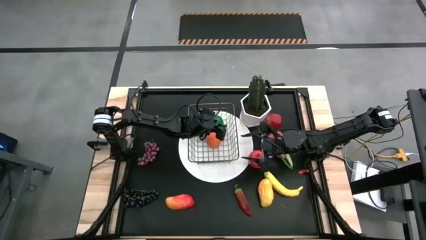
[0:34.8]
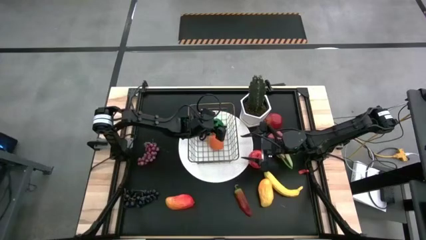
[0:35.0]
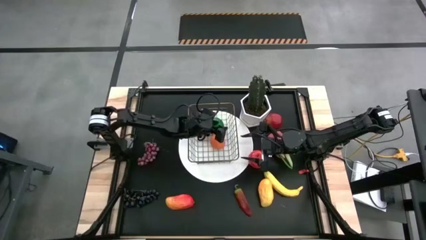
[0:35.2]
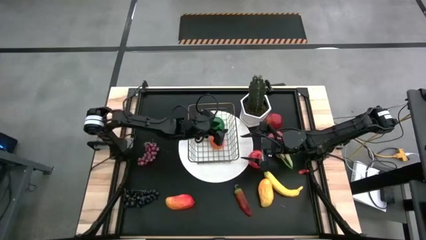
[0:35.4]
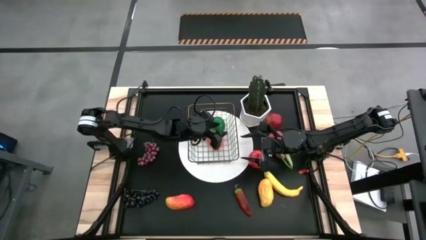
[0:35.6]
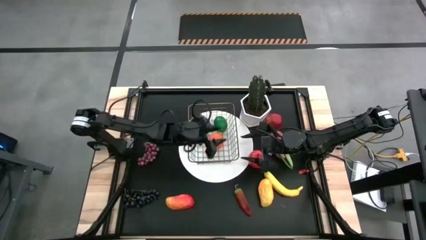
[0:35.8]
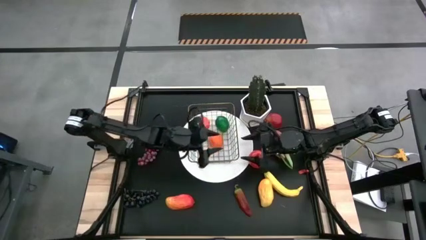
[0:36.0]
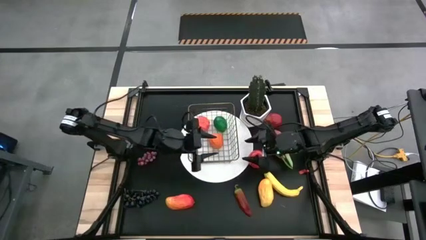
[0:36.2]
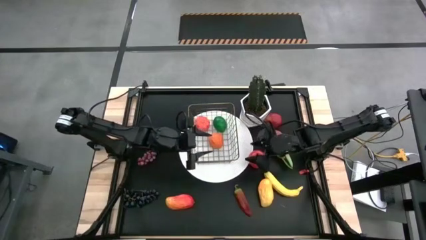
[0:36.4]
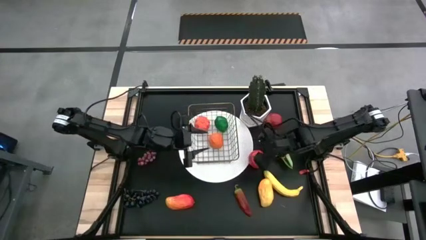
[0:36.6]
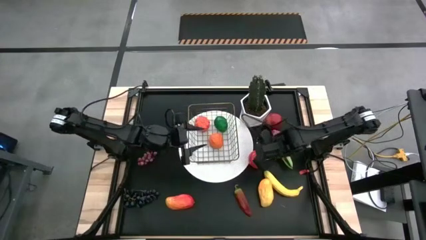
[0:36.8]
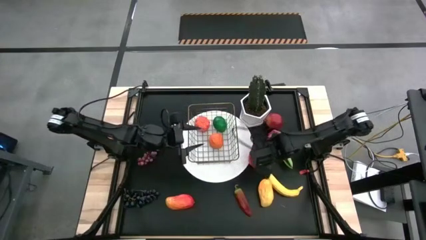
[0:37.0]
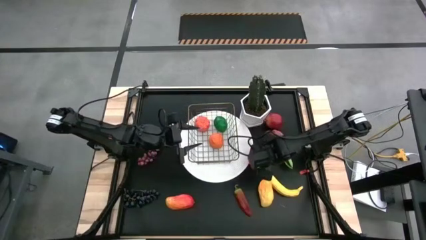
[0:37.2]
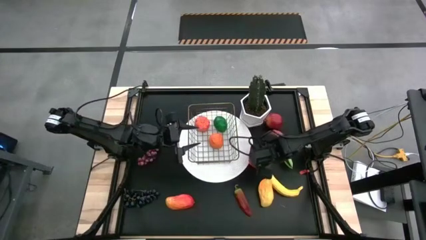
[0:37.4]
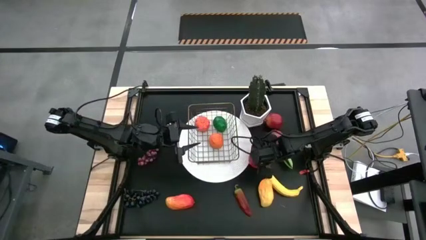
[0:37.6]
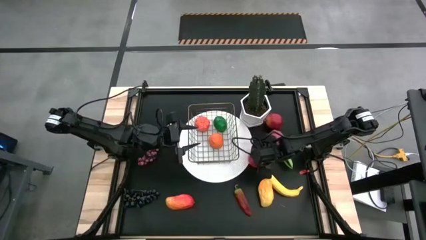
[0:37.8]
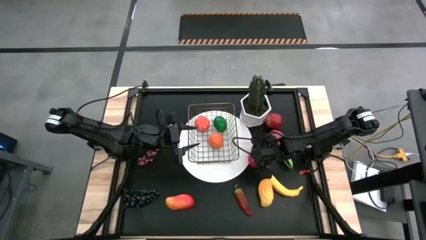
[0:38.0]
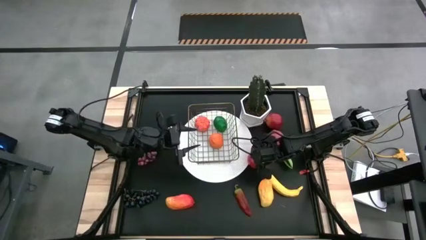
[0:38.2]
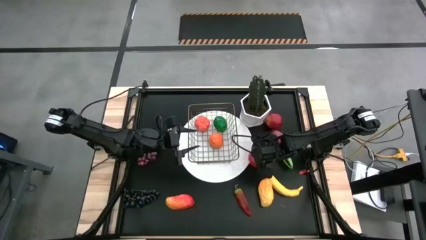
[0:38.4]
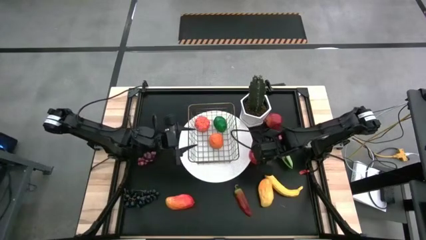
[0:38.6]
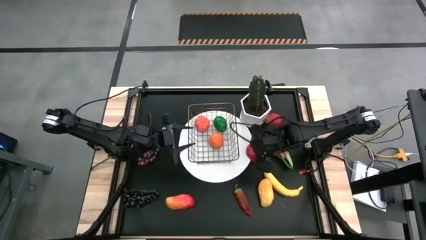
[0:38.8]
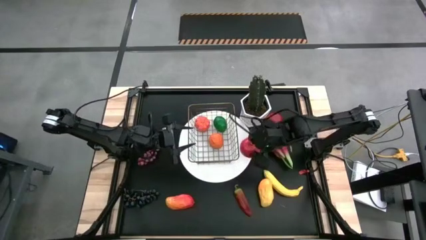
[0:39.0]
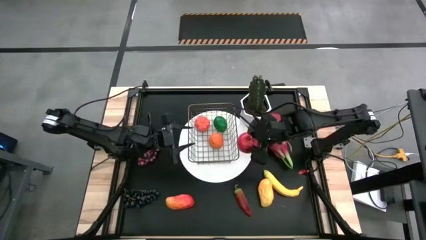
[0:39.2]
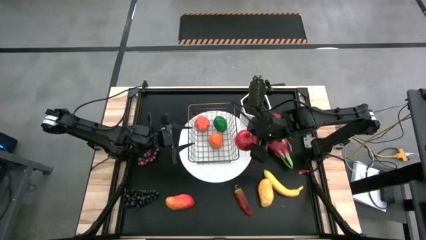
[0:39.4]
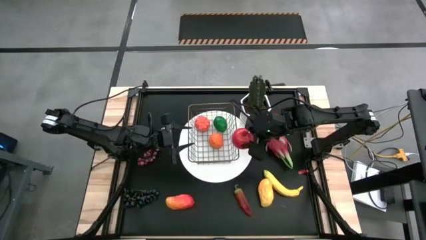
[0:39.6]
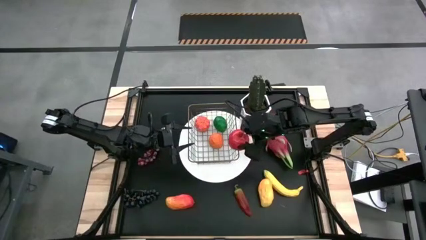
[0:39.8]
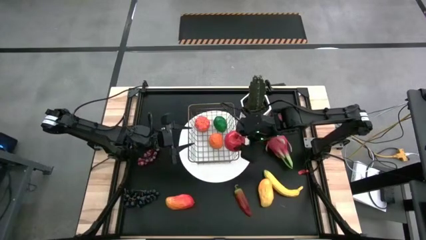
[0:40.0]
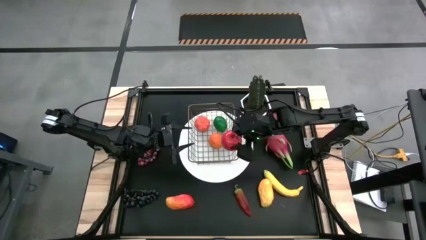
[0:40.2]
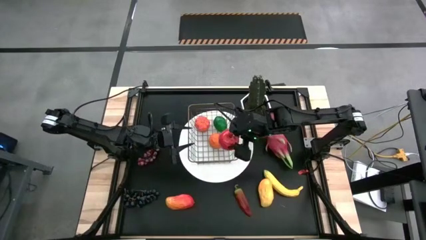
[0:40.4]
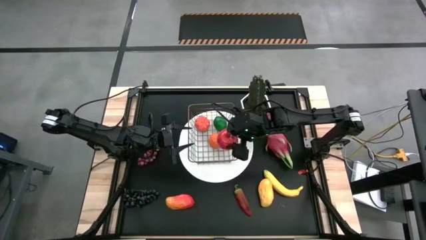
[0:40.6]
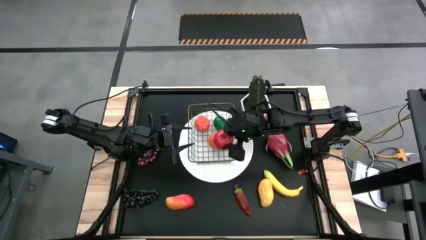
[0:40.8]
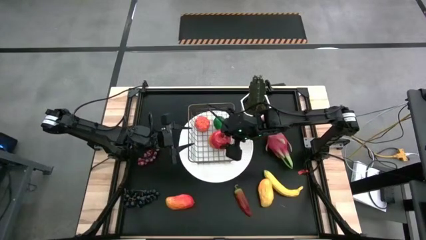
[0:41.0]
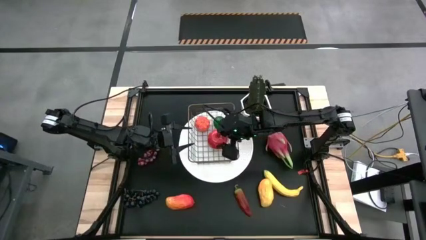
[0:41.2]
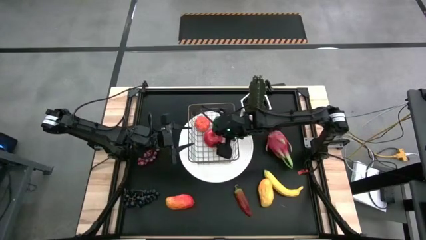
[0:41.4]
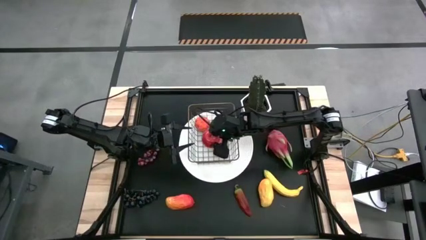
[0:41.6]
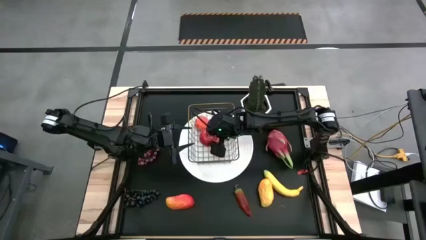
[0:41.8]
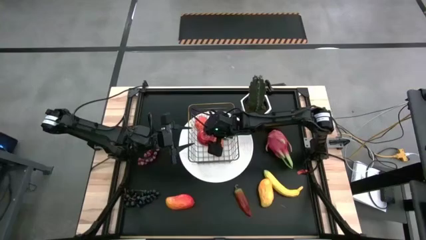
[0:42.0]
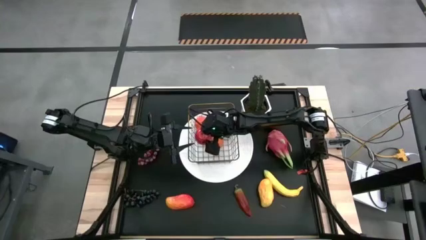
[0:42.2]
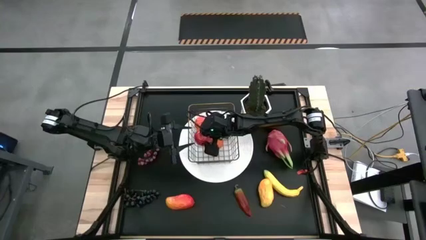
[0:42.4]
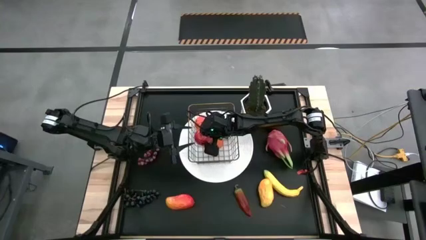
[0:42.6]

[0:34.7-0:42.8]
Task: Build produce basket
Put the apple into the gold wire basket

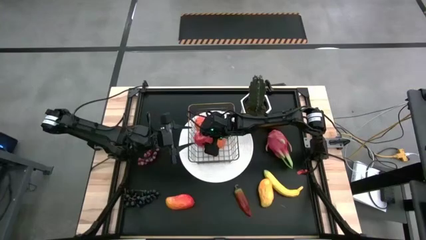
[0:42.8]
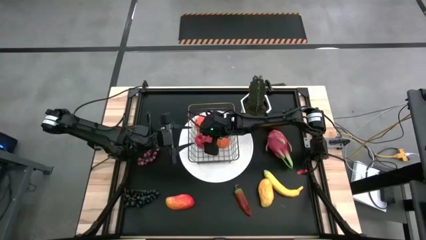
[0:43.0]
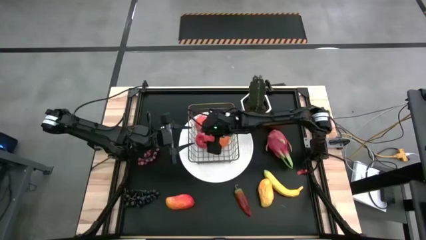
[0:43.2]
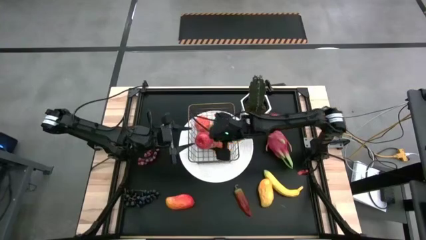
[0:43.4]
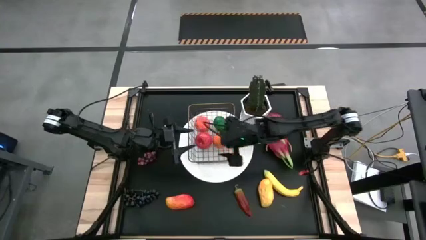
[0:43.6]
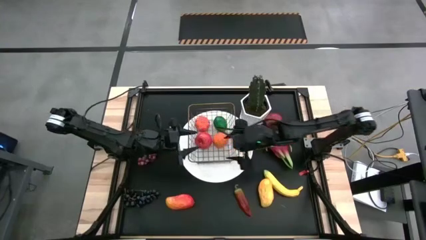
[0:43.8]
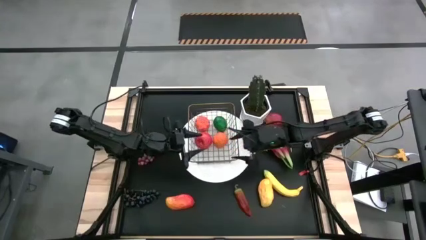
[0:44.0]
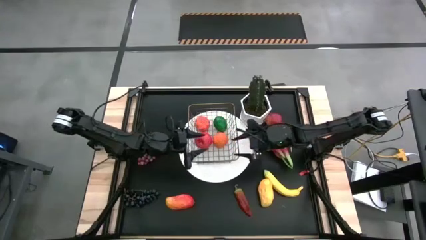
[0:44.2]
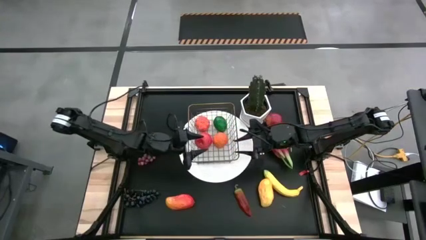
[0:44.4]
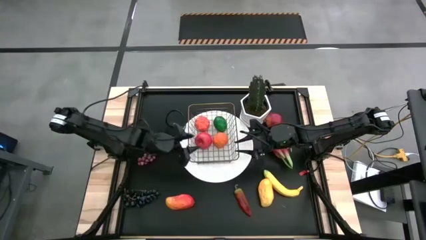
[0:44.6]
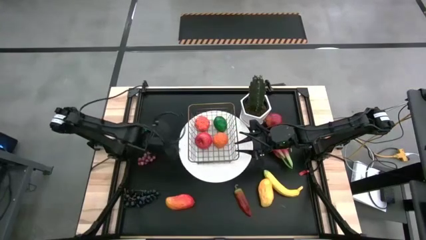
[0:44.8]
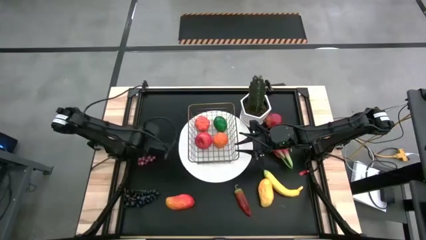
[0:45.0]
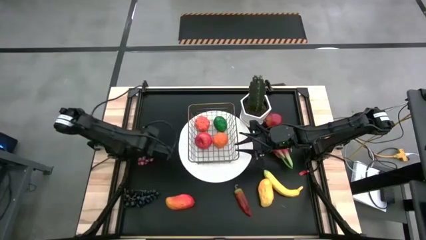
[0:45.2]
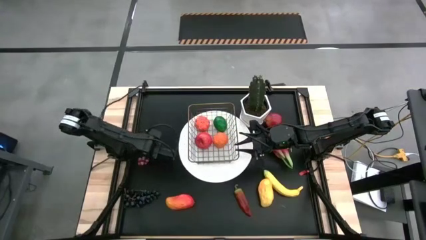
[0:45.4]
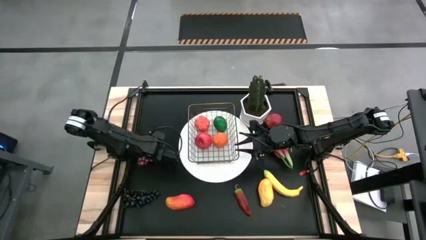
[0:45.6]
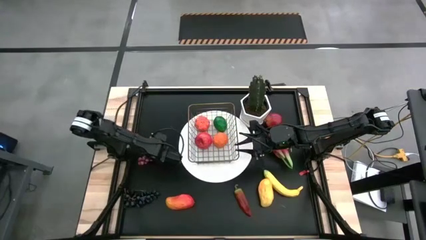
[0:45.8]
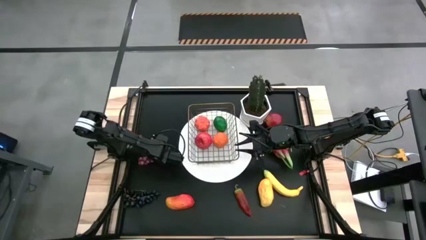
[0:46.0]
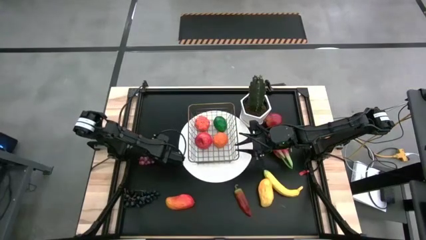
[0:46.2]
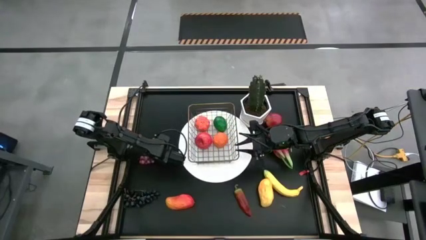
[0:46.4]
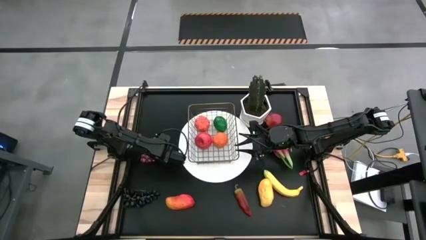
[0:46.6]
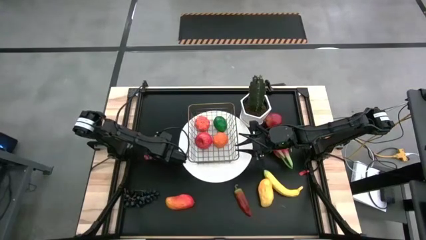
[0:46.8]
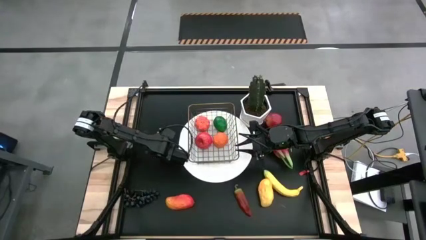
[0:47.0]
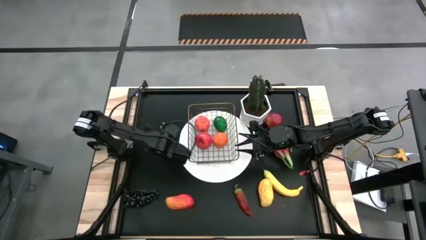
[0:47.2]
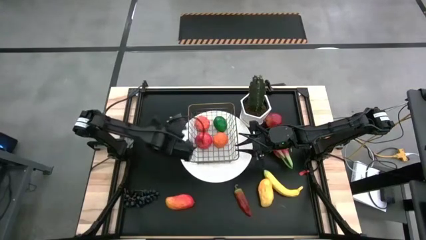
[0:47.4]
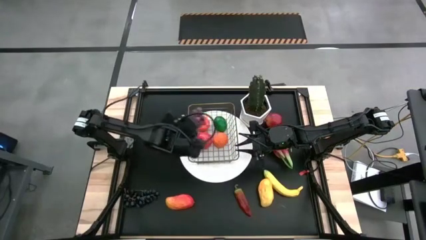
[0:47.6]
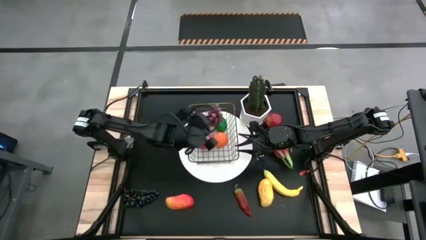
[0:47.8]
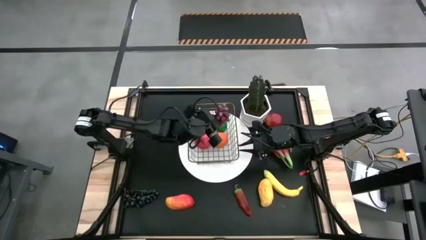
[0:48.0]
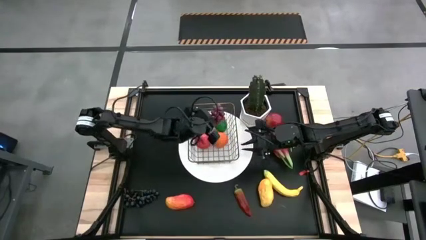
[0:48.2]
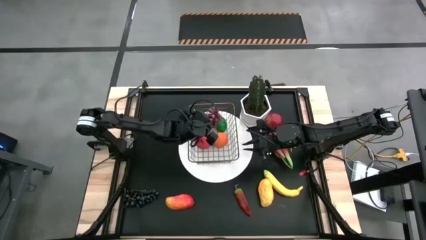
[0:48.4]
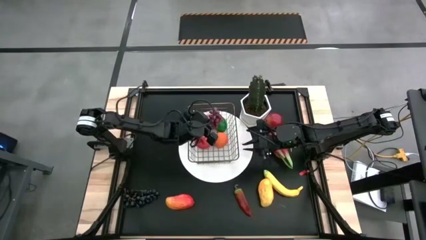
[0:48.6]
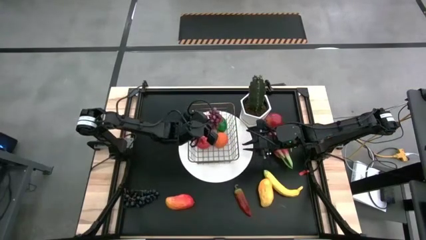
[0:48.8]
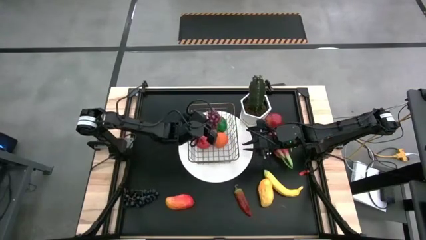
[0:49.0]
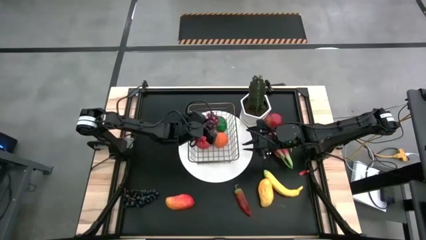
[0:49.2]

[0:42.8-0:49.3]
Put the red grapes into the gold wire basket

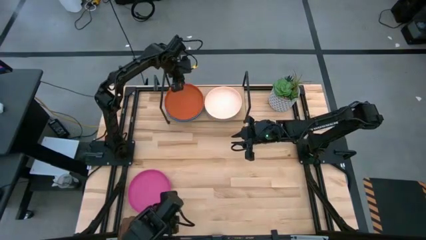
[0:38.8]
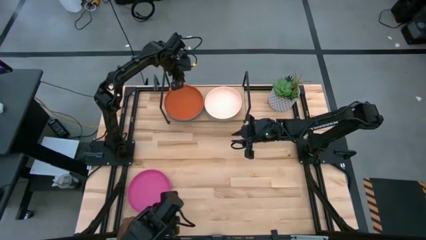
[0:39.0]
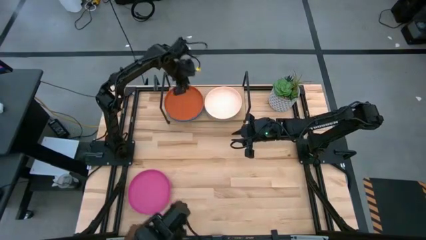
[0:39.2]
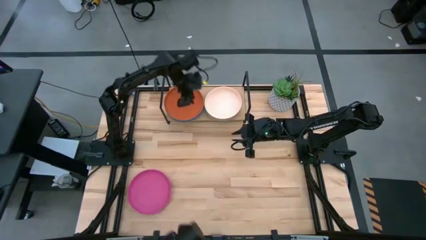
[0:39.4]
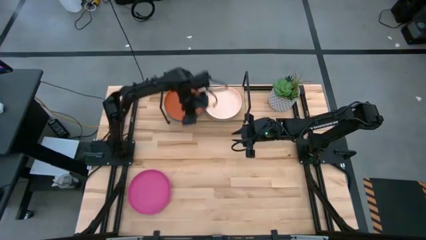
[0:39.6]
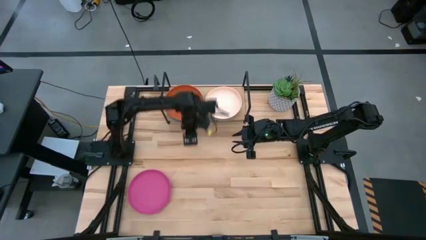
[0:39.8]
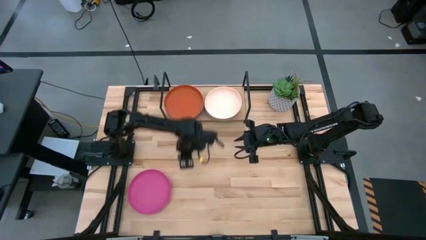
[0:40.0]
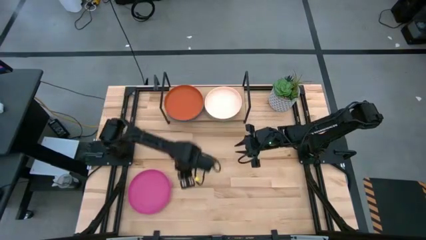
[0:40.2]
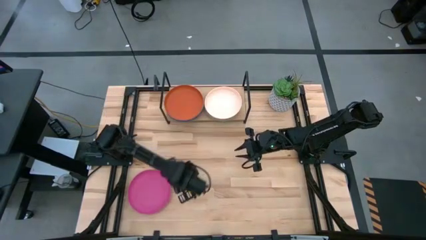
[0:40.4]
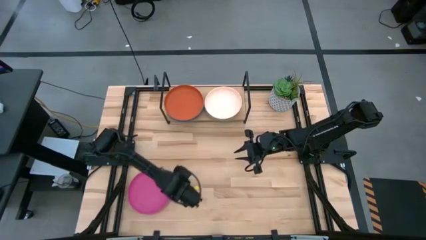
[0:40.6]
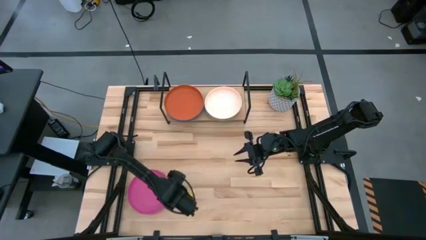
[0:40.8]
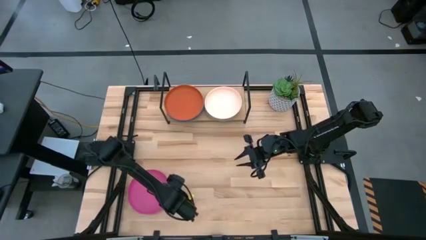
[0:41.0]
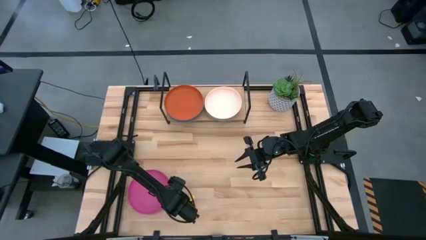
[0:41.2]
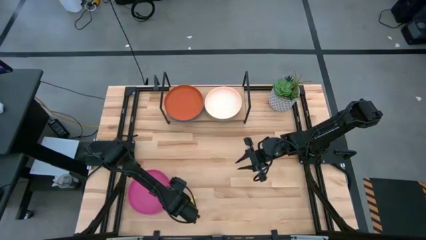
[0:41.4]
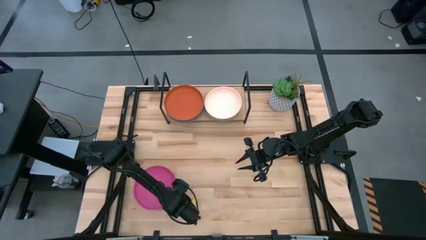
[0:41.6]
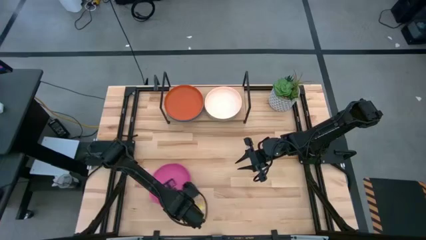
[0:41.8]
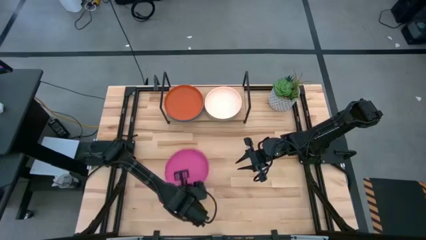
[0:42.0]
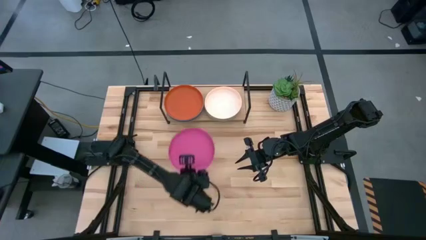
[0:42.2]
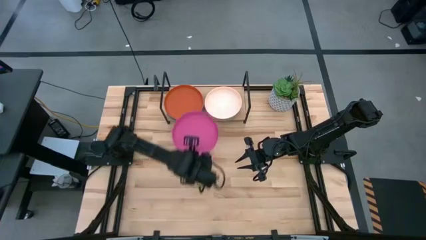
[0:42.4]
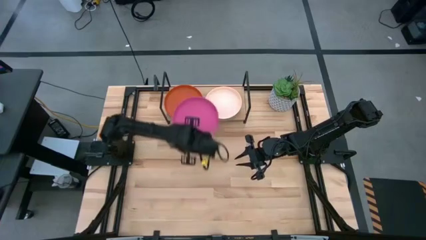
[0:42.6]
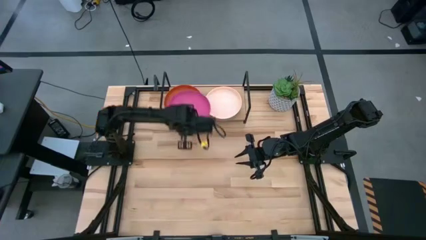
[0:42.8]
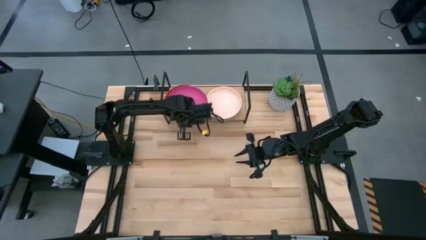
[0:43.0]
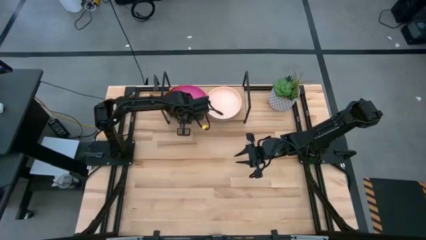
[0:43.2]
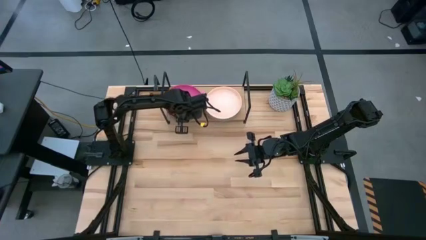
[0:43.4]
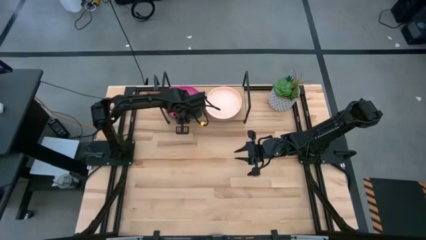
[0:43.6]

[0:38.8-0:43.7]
Task: Place and stack plates onto a shelf
Stack the pink plate on top of the stacked plates on the shelf
